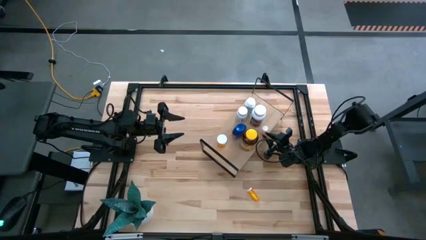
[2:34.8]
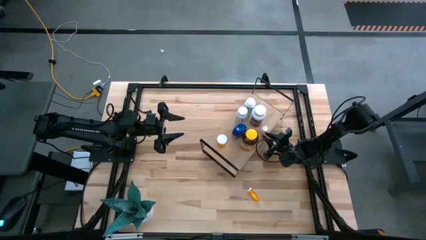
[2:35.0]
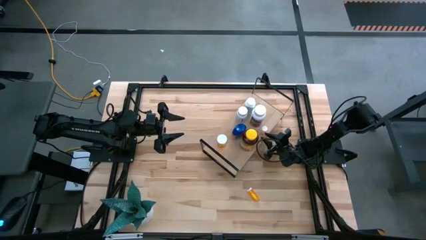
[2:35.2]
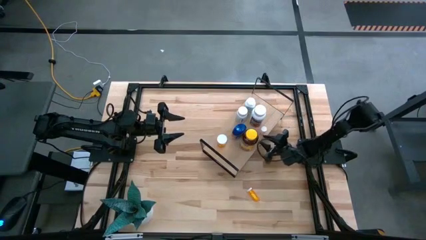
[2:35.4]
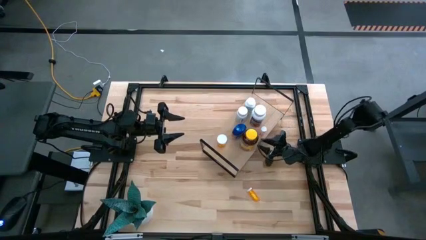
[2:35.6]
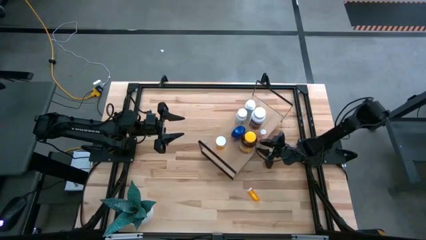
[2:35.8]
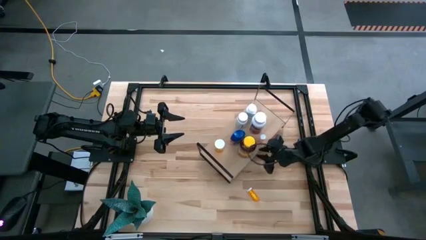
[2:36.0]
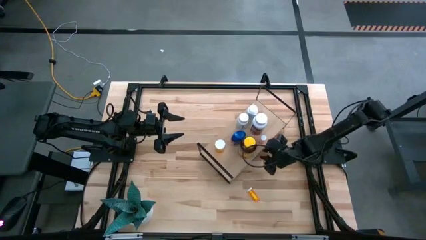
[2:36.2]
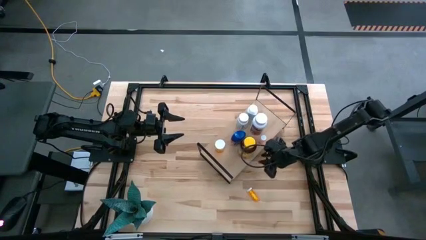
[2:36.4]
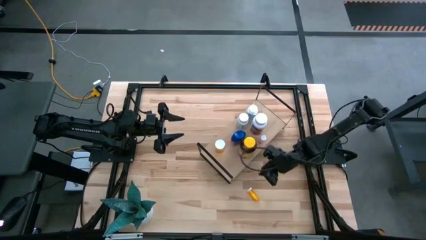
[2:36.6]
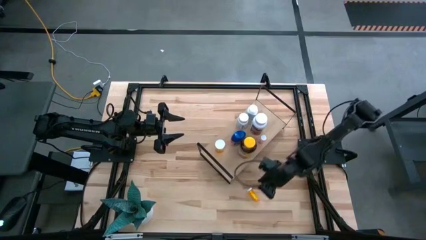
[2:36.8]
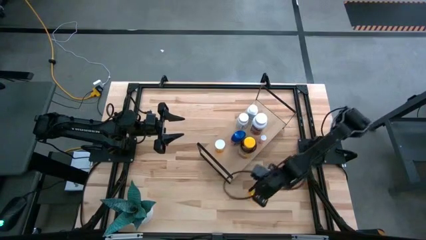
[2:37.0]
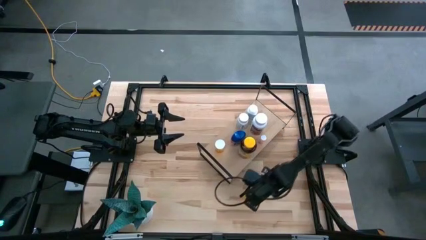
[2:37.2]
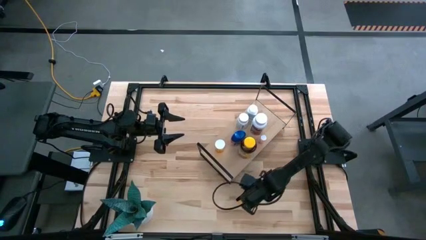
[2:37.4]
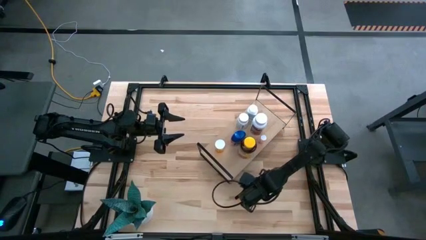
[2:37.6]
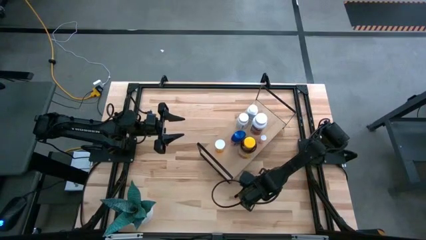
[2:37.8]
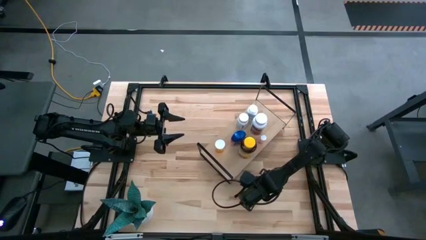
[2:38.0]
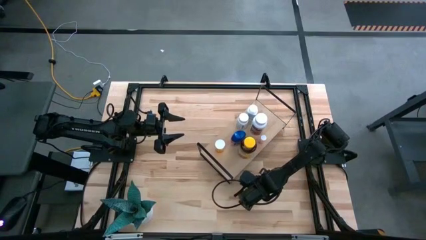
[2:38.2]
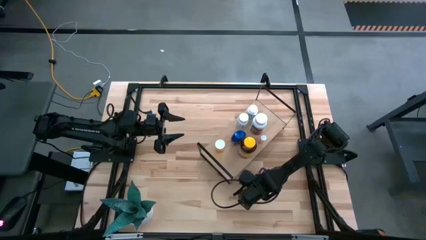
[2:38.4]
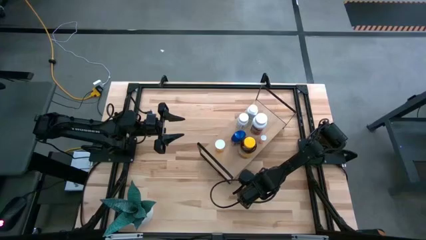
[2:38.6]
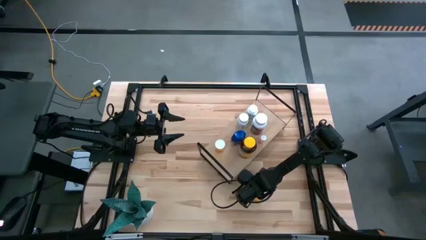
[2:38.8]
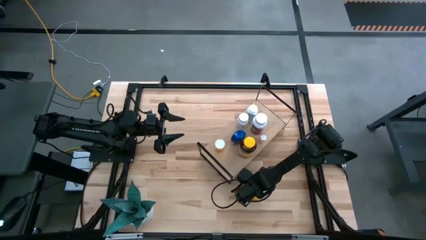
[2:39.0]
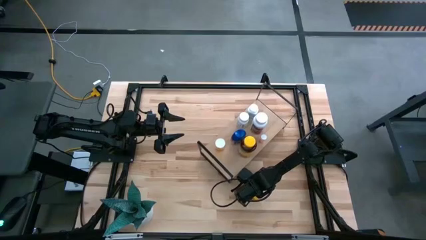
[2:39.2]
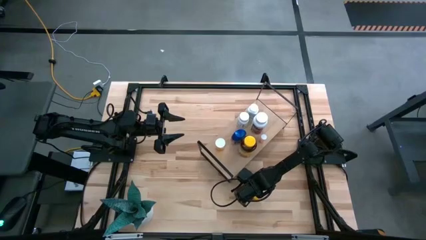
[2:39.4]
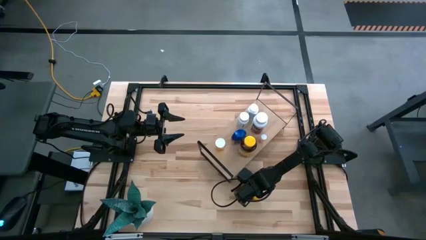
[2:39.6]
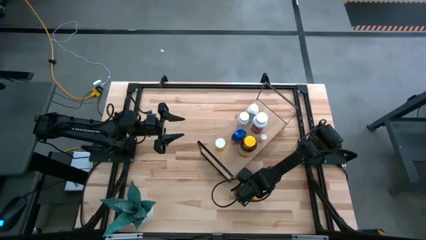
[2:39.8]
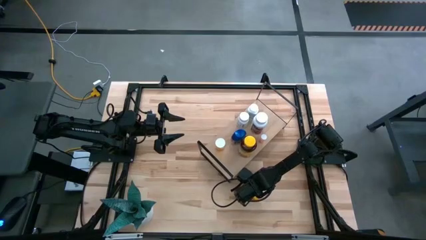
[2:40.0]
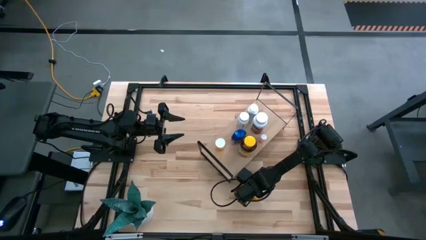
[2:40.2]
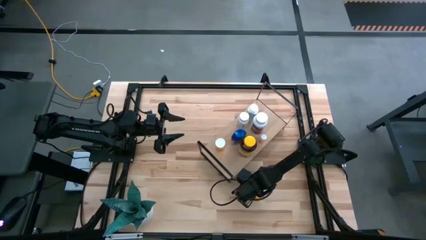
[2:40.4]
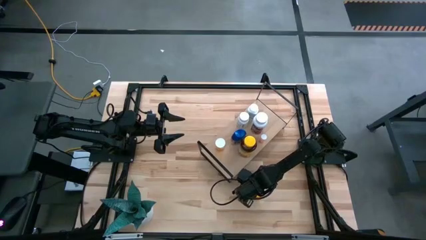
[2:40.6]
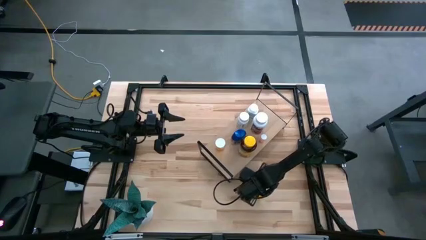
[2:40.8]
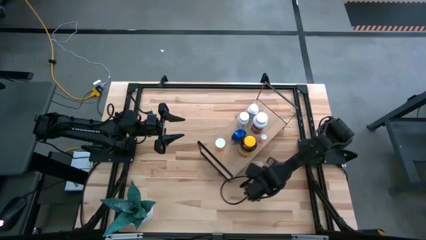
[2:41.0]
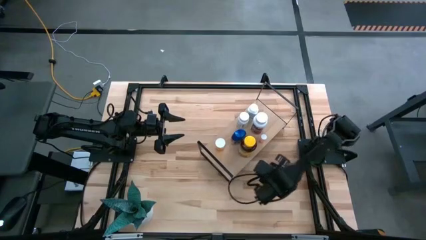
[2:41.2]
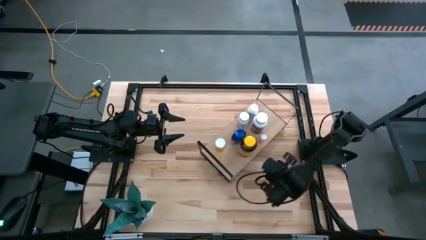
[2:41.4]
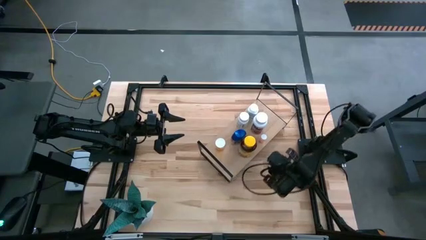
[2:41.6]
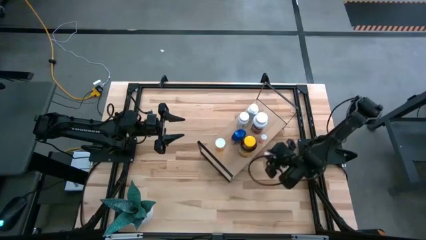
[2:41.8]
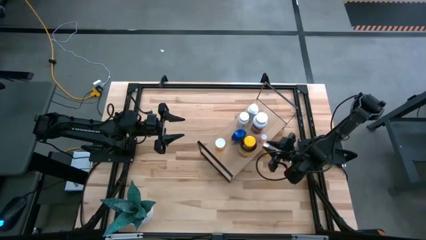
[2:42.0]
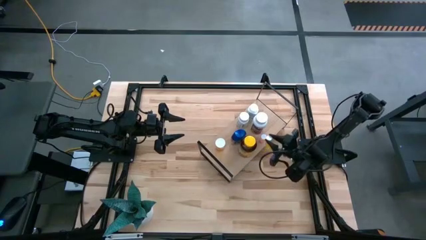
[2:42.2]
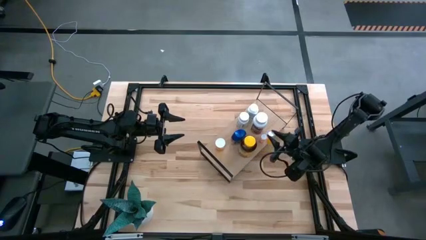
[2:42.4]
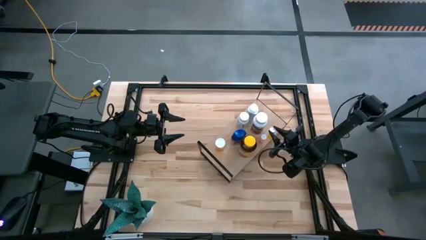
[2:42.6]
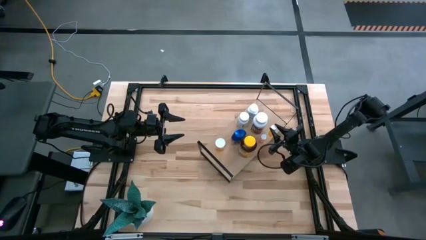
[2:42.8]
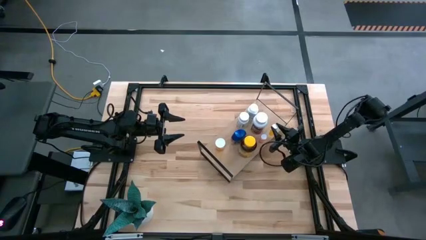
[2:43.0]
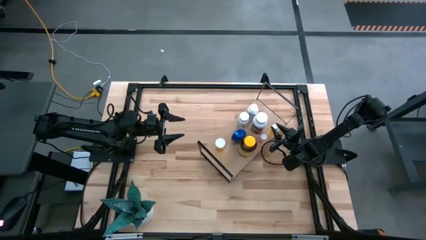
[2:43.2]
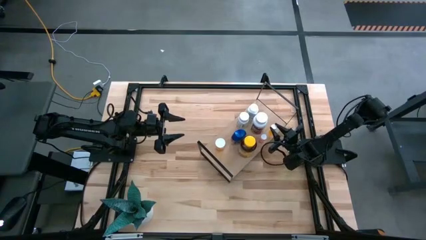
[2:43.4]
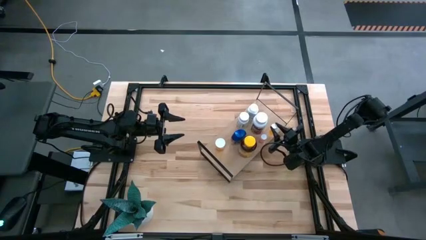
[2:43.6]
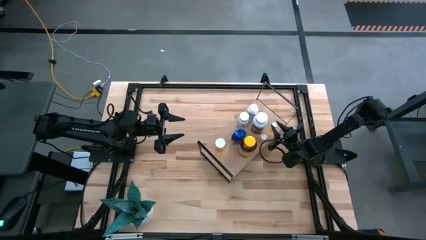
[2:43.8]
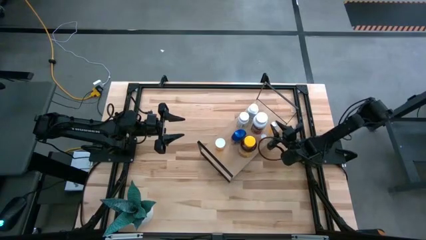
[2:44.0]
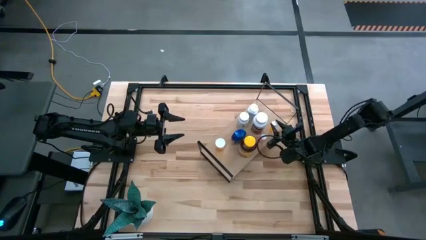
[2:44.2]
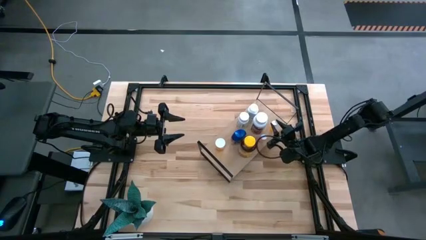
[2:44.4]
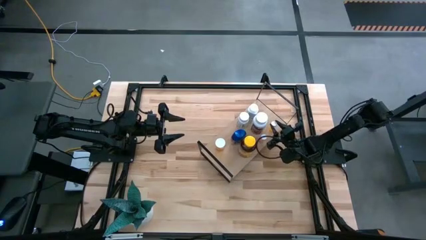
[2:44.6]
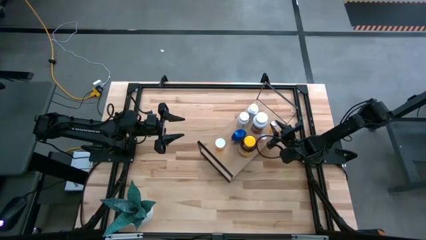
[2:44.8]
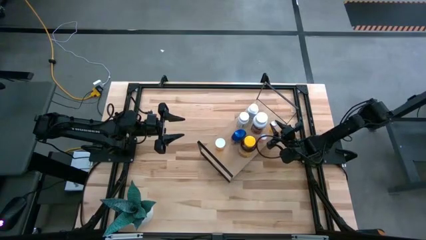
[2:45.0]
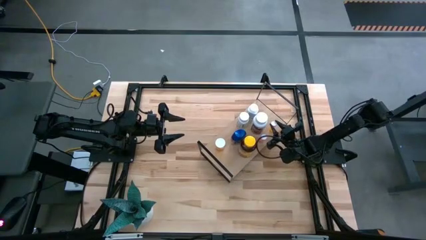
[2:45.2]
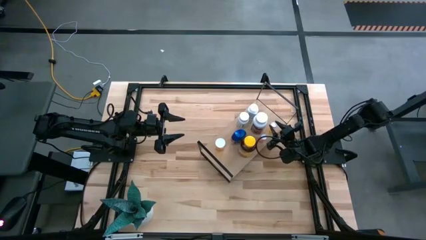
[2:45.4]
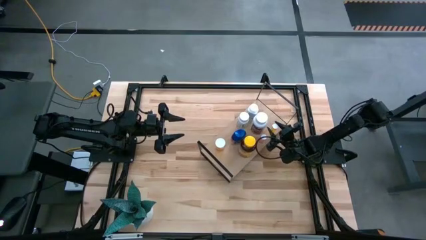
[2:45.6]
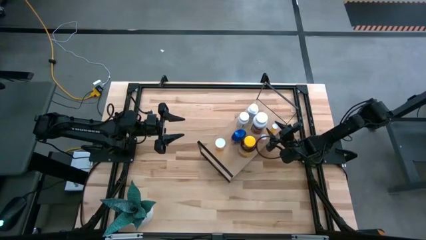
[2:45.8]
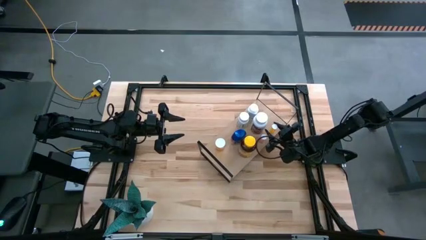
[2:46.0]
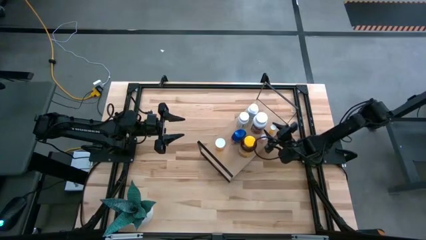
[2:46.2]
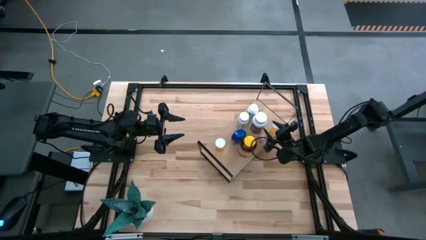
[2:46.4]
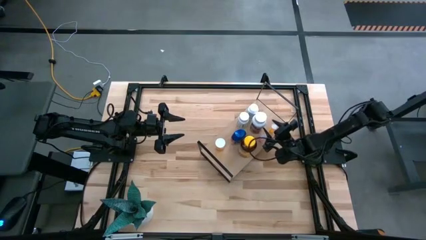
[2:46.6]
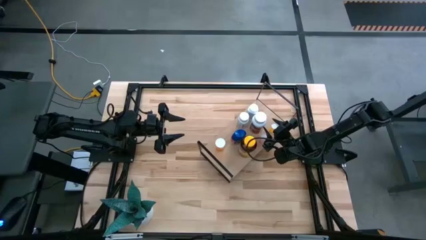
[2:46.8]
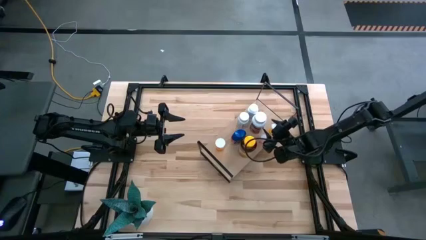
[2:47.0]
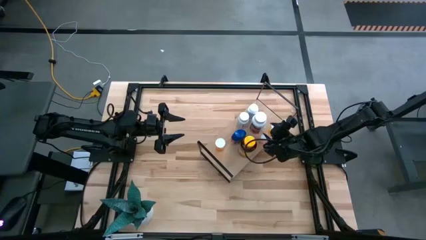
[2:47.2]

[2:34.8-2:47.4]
Task: Pick and place medicine bottles onto shelf by color
Put the orange pill bottle on the shelf

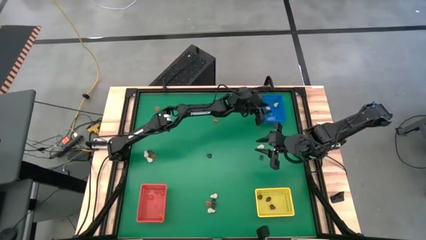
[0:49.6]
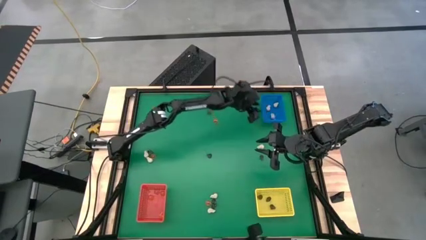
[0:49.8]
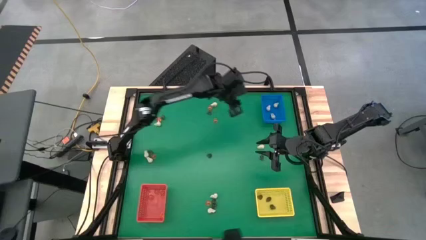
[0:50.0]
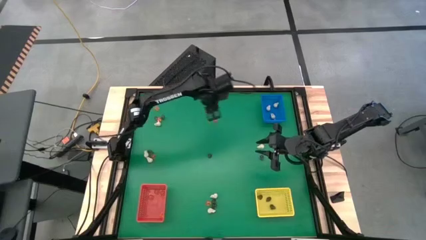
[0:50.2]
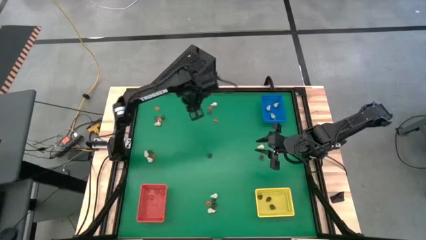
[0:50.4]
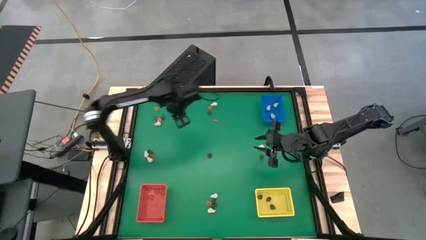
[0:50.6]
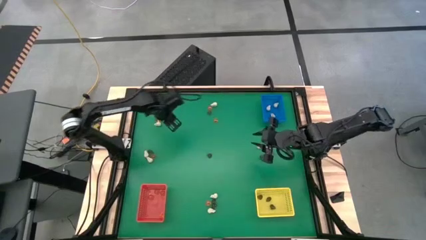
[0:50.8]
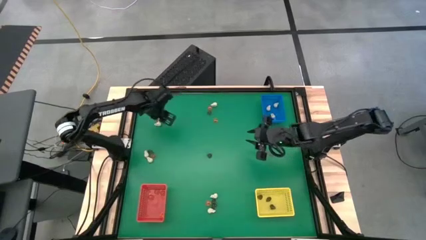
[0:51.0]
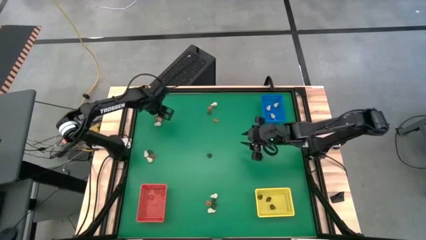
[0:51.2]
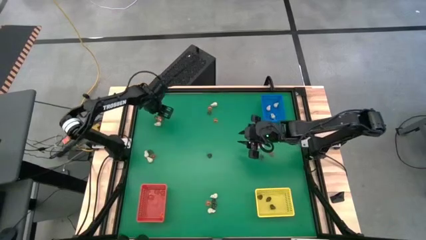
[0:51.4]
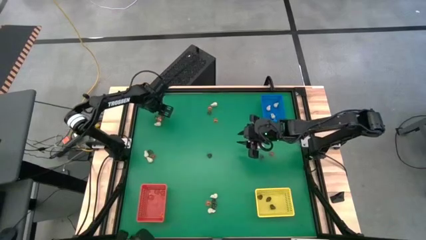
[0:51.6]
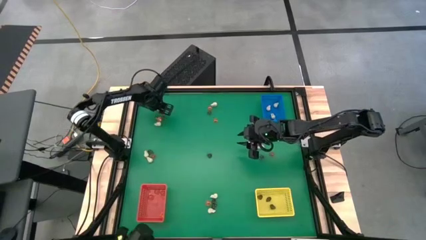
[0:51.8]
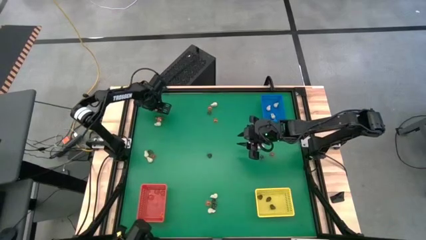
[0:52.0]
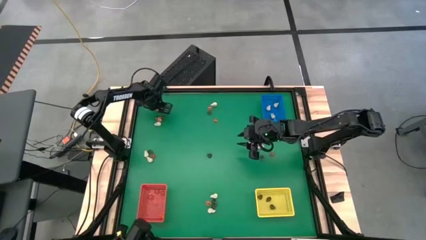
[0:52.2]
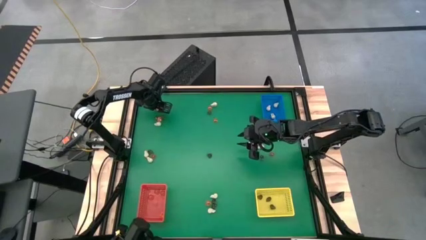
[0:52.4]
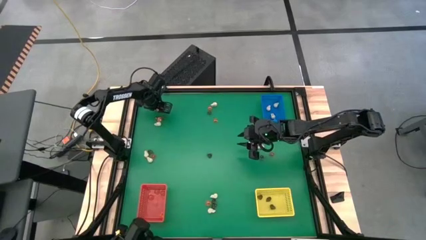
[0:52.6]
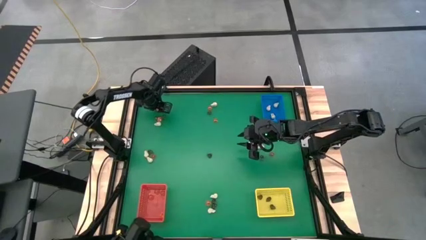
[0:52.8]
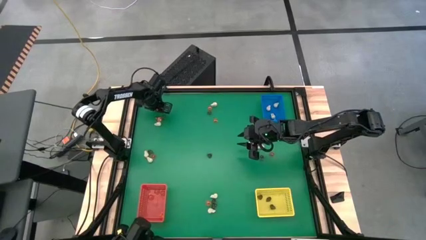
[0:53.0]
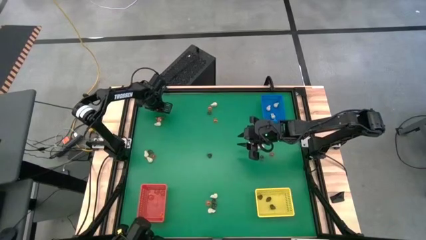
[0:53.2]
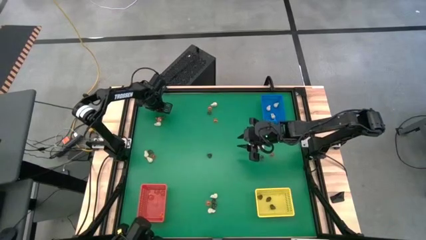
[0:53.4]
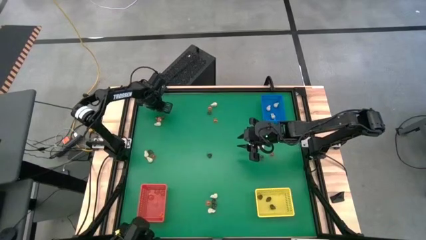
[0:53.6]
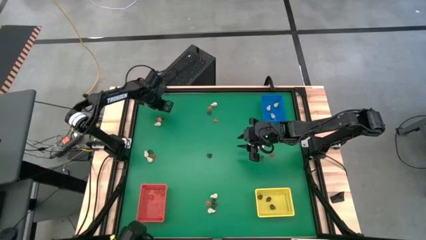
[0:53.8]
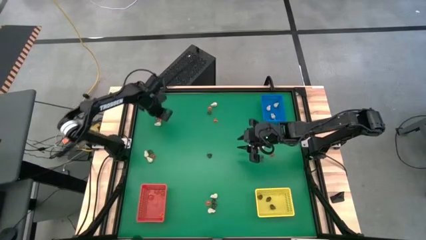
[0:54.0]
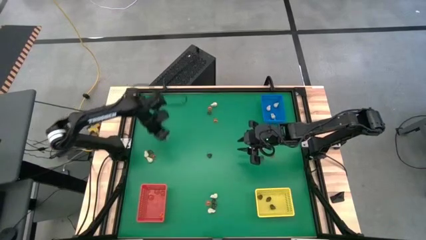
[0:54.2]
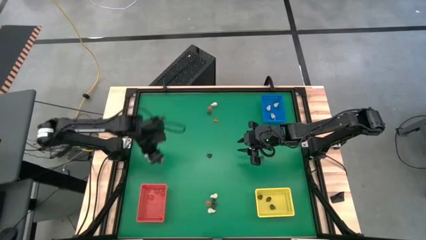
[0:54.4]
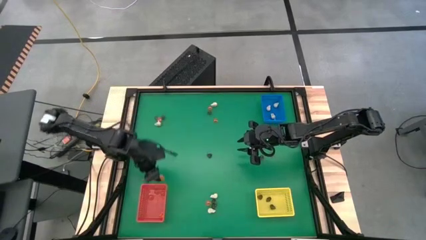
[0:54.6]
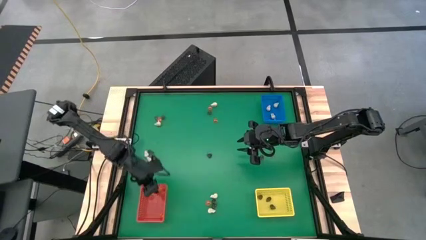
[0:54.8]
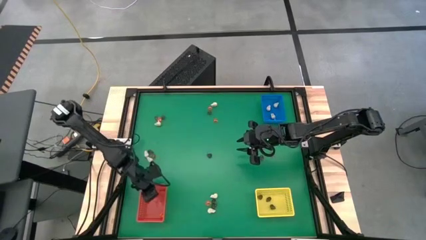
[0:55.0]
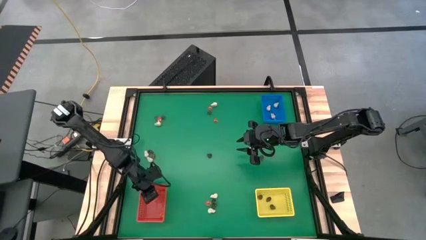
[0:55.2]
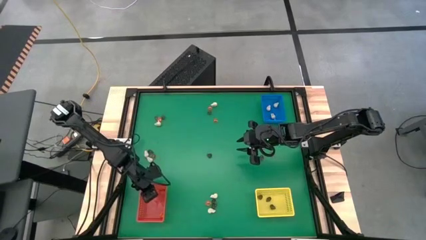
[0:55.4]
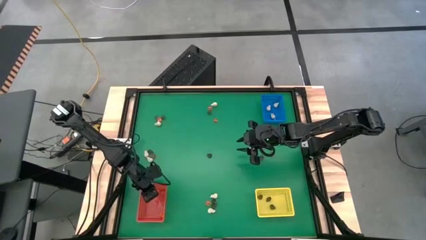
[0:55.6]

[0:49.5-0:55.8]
Task: Sort Halloween decoration
Put the orange pumpkin toy into the red bin
